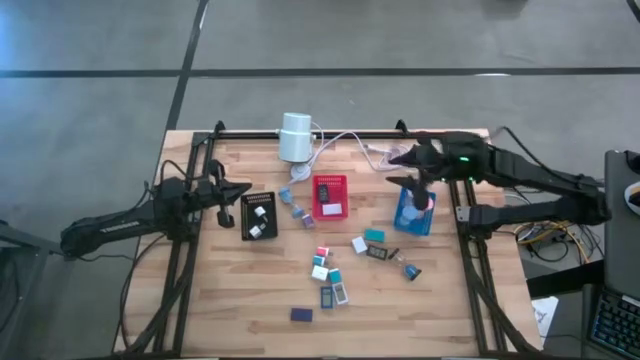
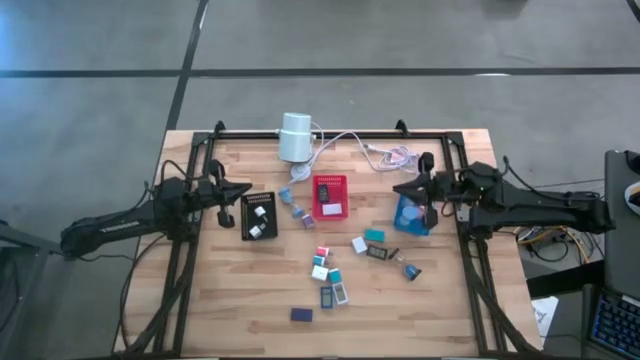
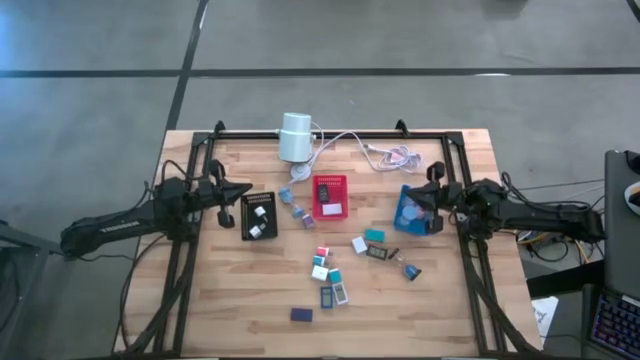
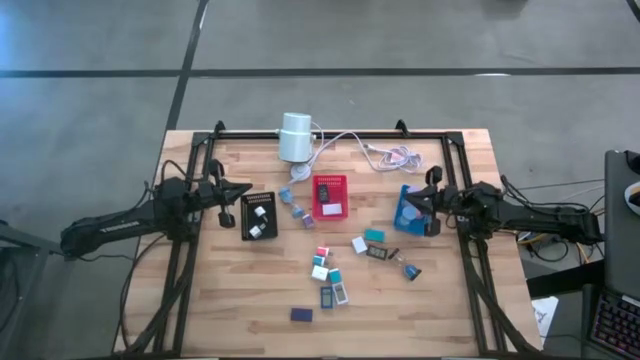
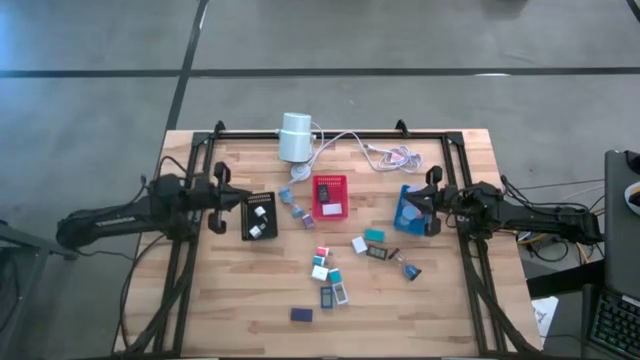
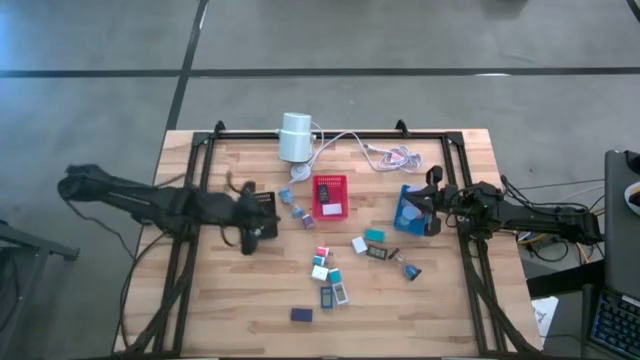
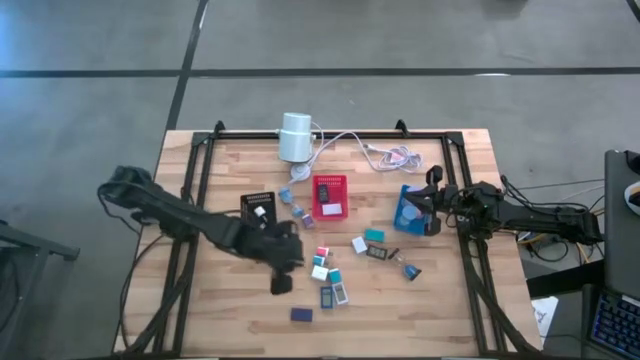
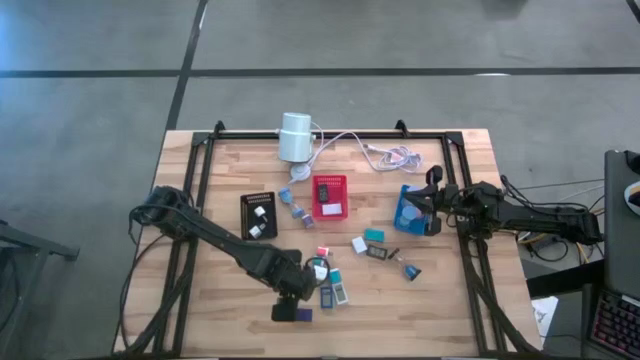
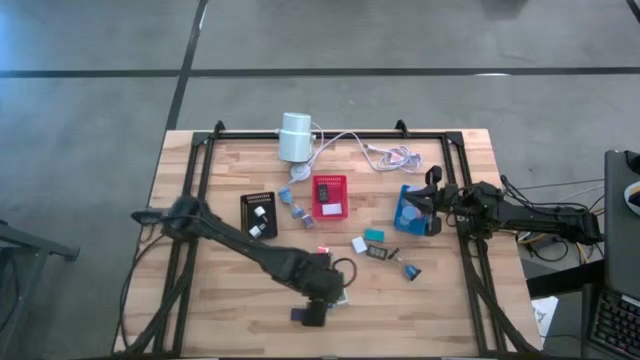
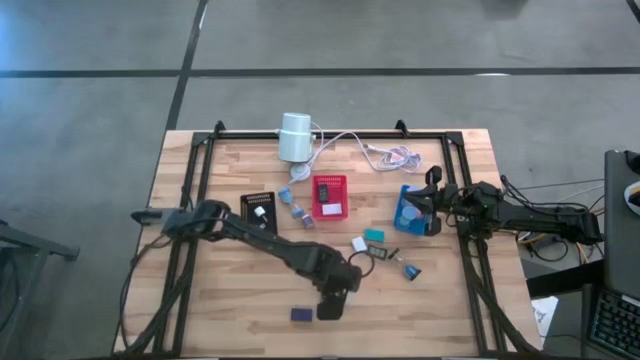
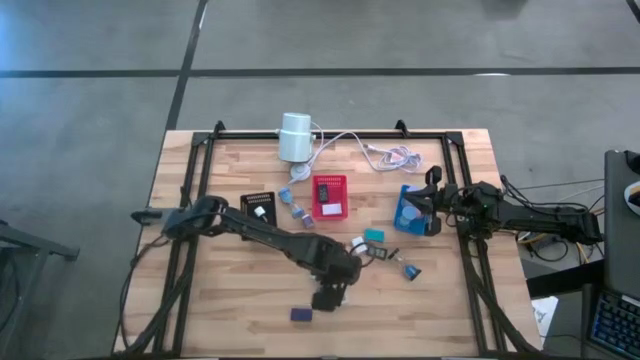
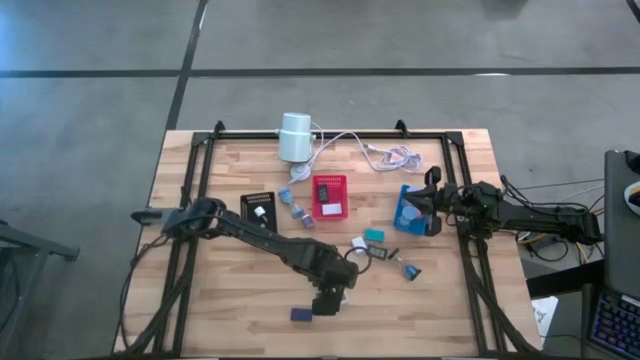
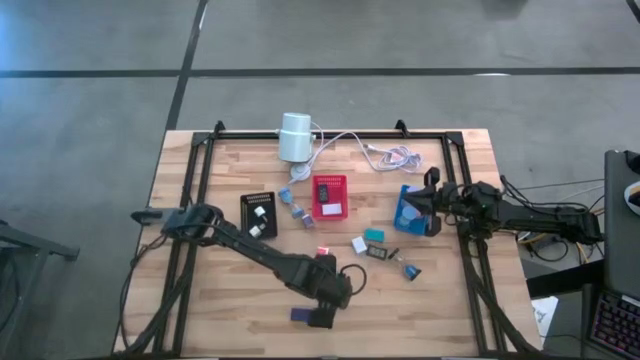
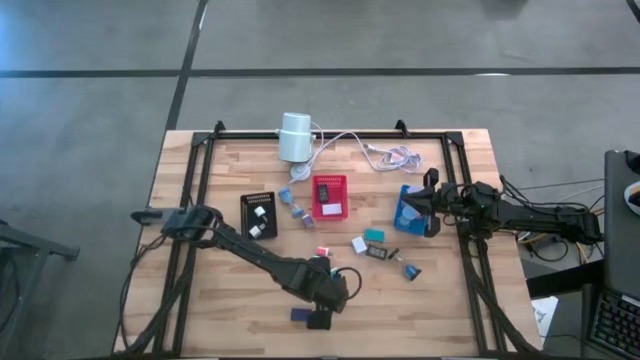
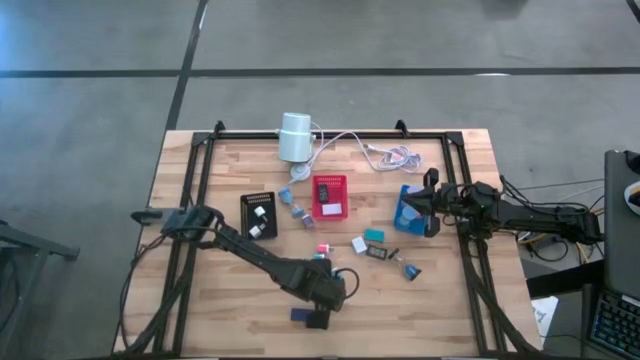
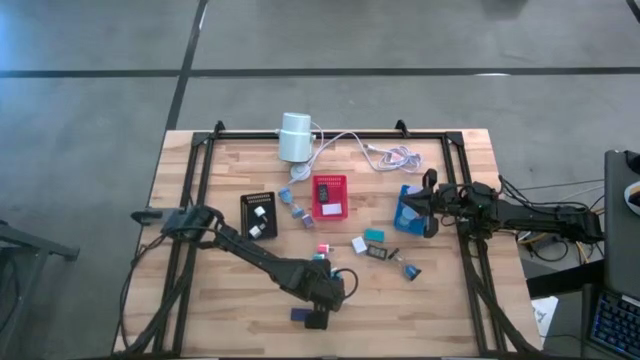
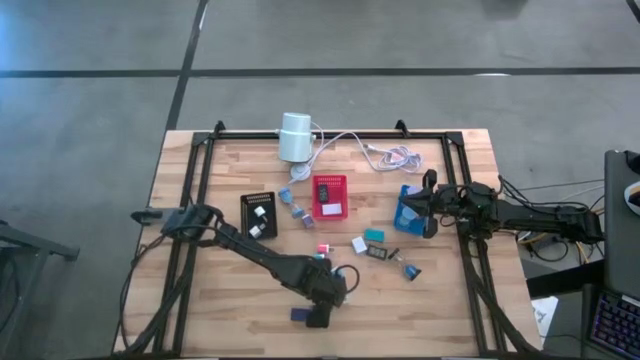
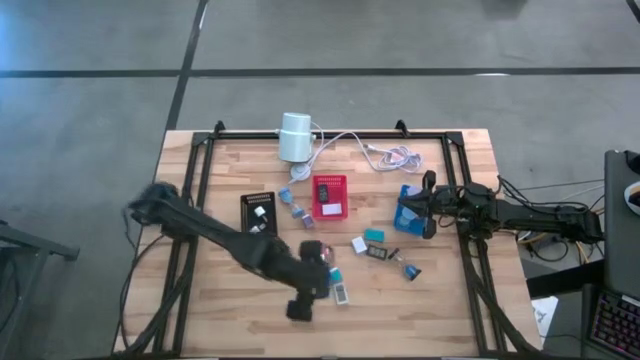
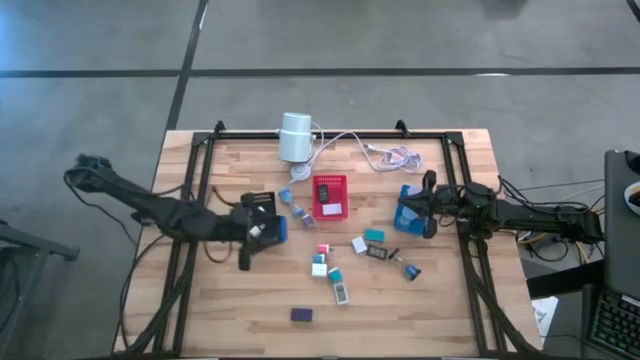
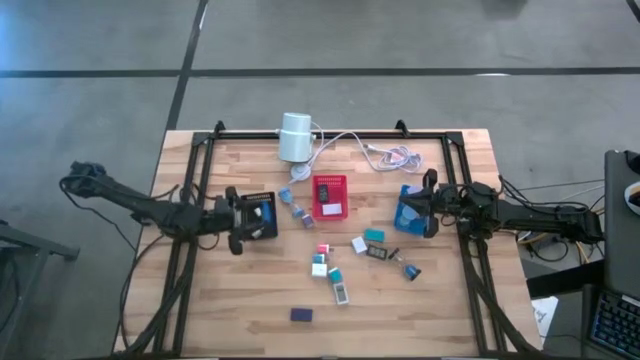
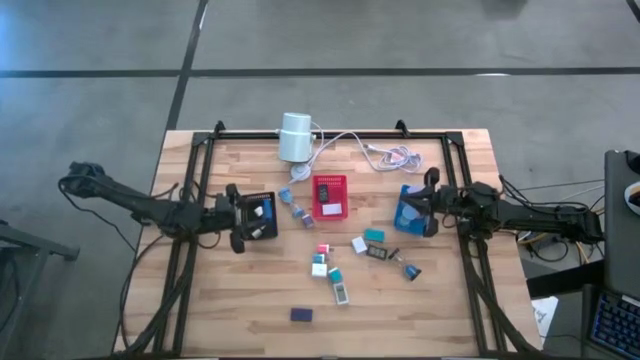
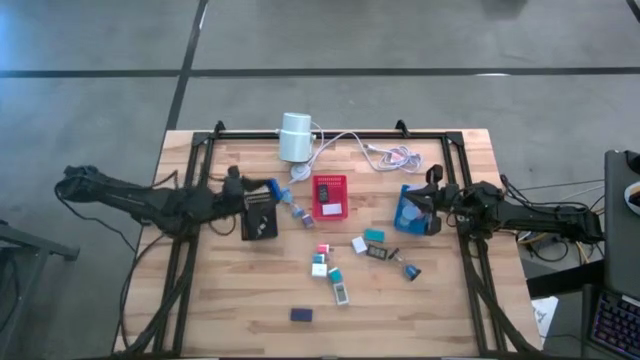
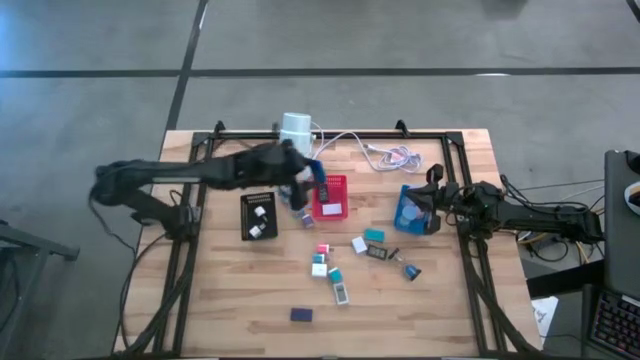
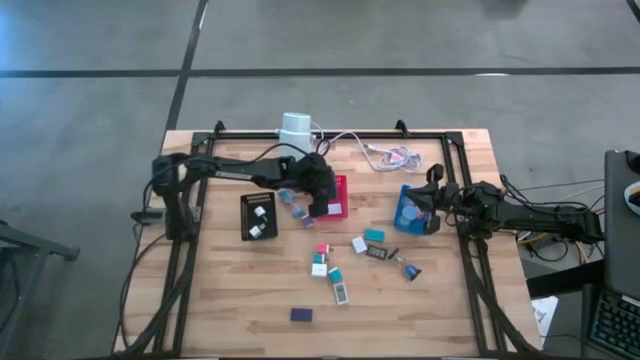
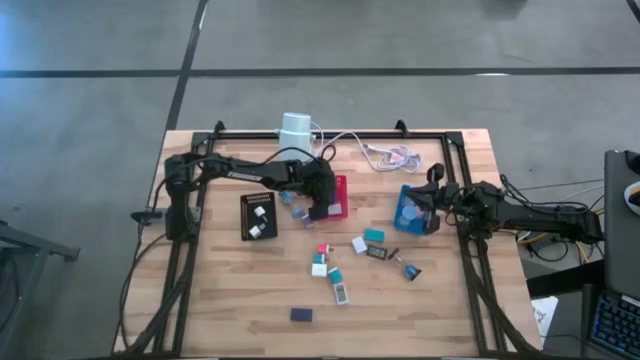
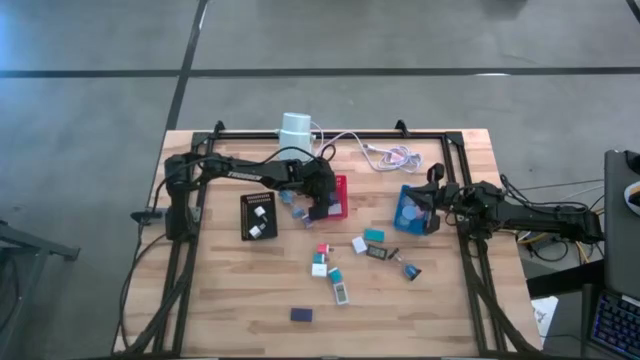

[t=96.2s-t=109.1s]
Task: Pick & Place Office items
Put the right dark blue digital clock into the red basket

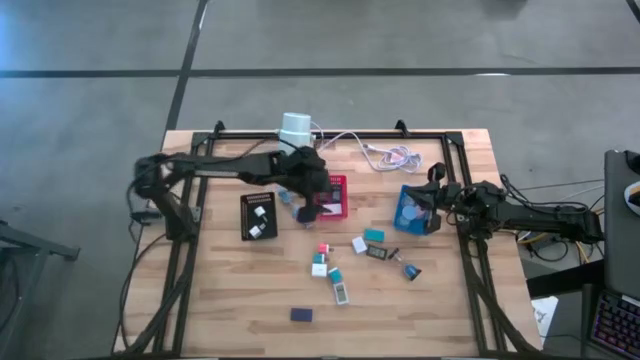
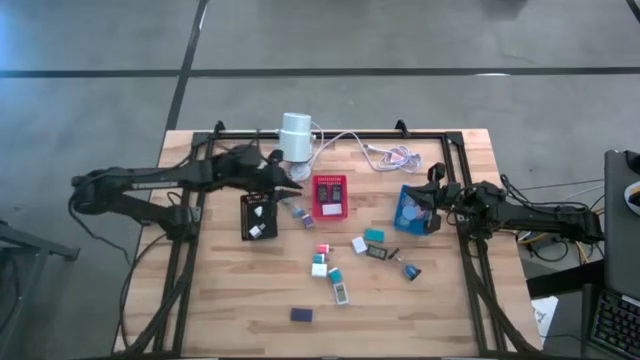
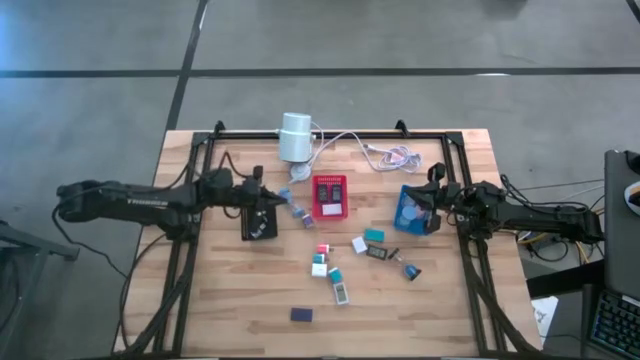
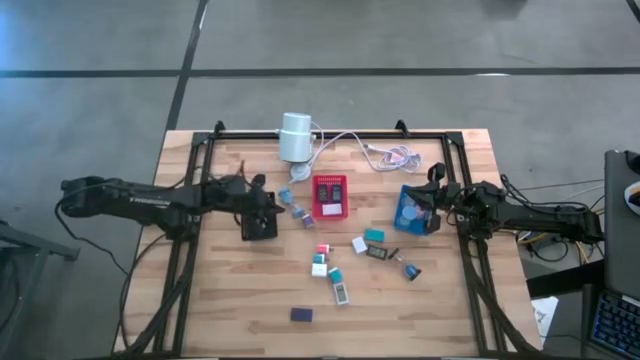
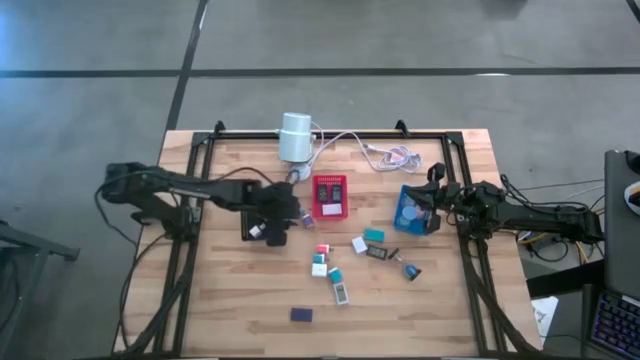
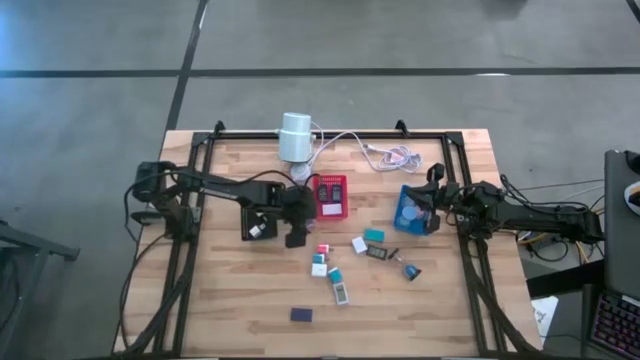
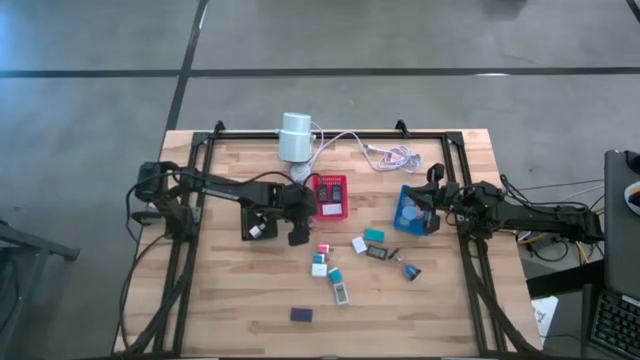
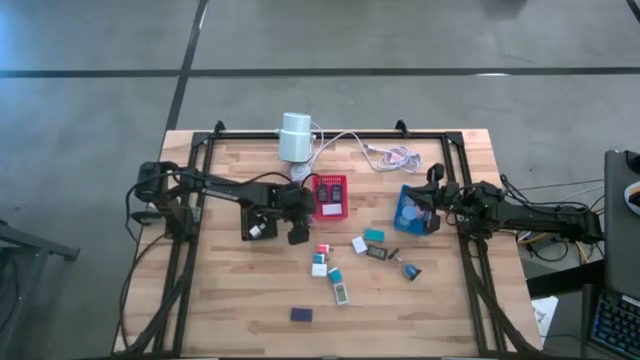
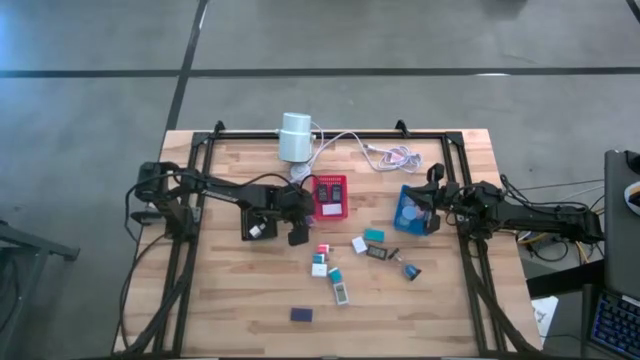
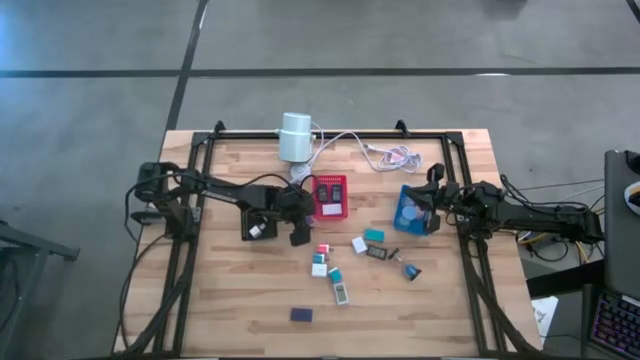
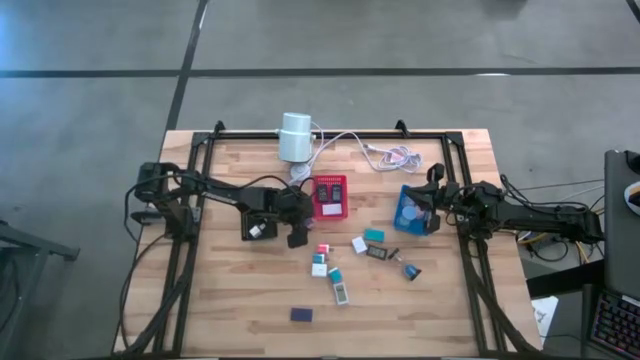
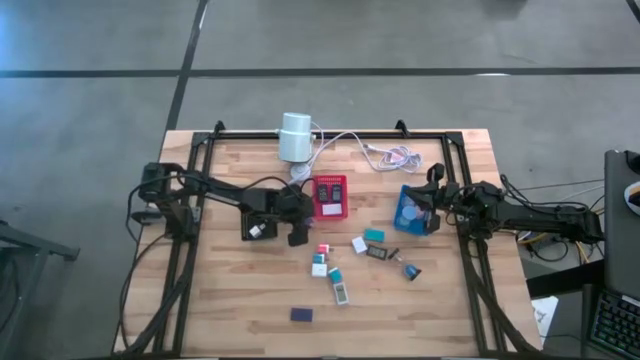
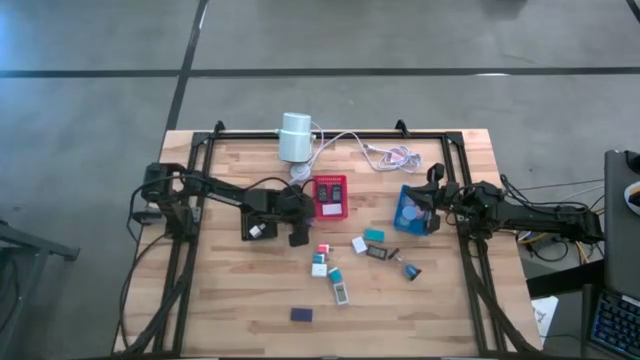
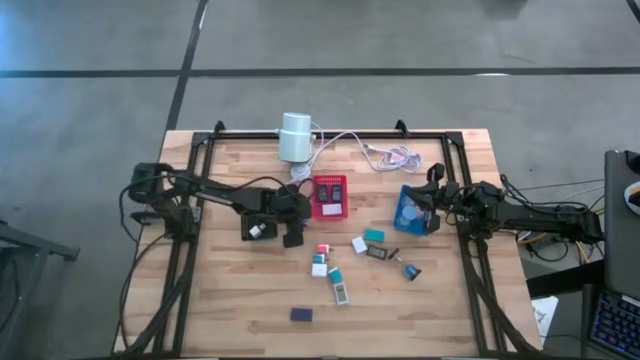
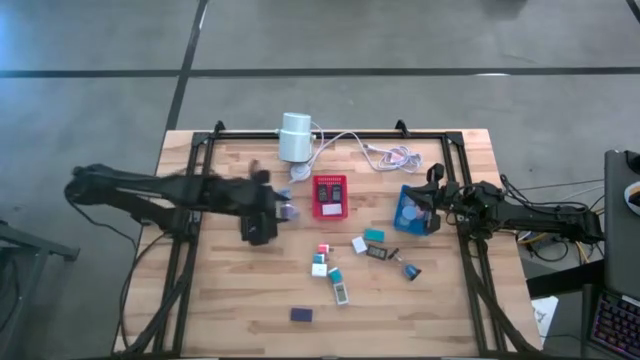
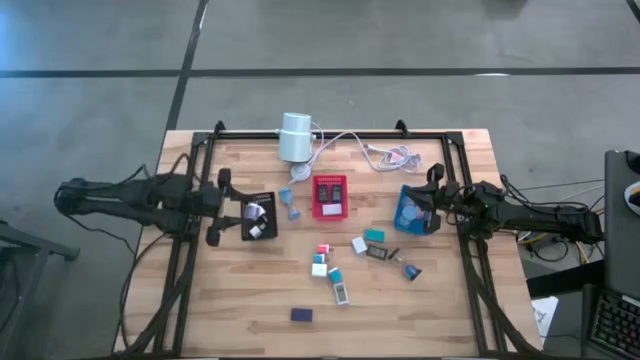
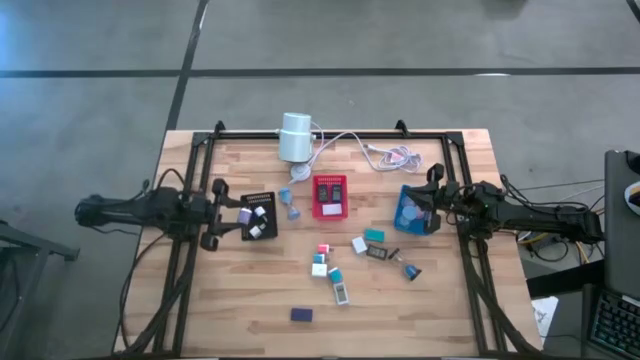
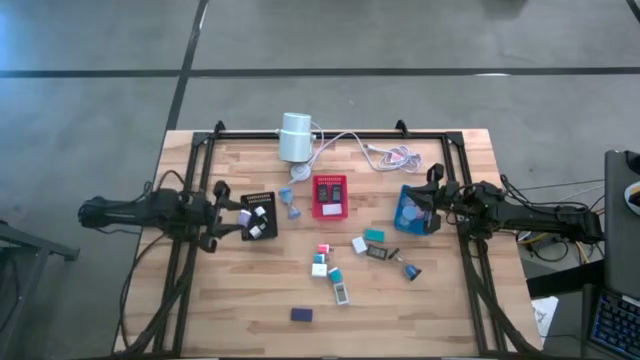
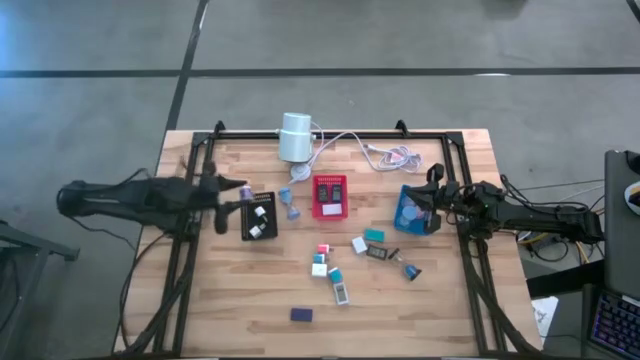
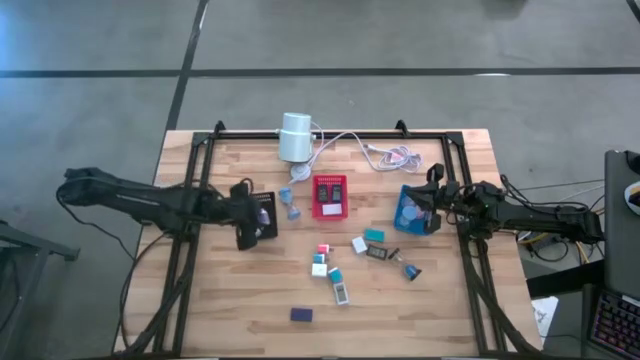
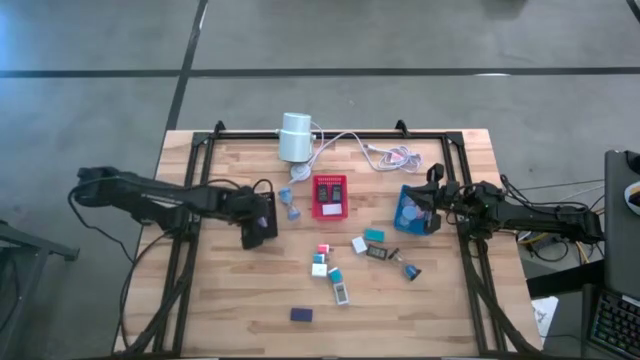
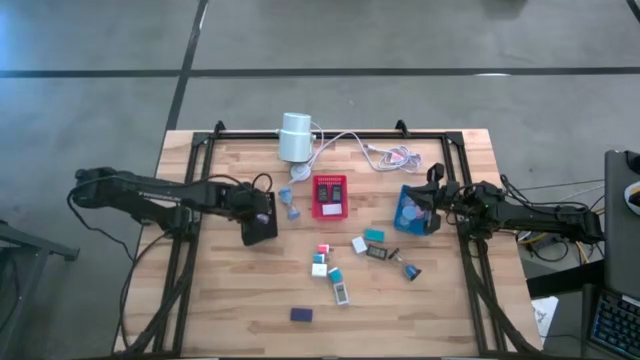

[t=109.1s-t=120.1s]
Put the purple charger adapter into the black basket
